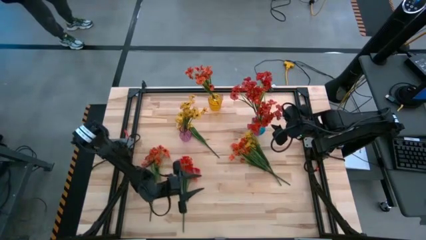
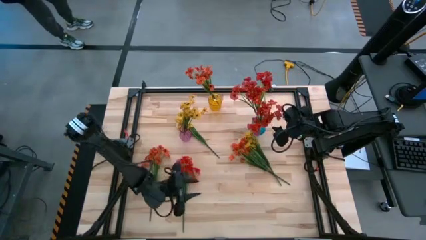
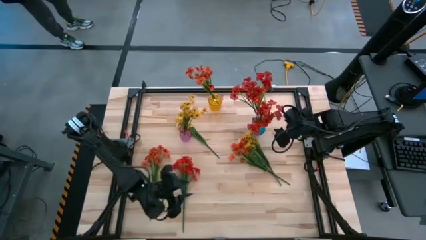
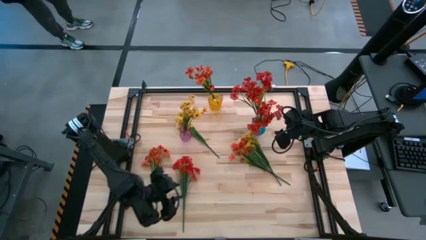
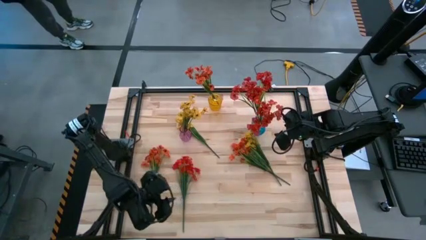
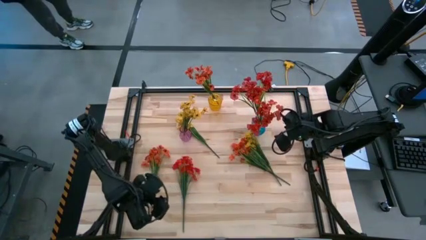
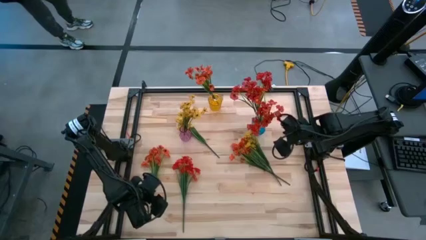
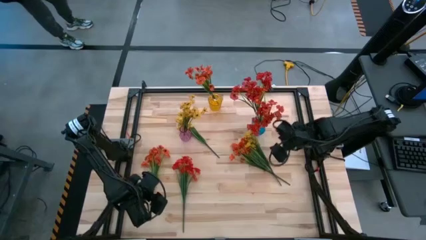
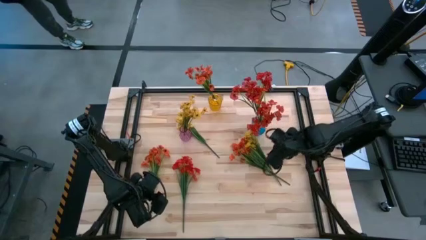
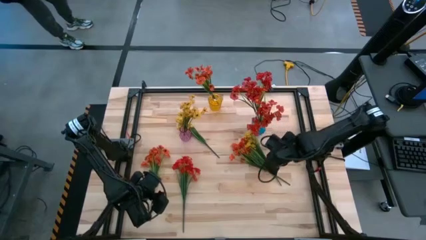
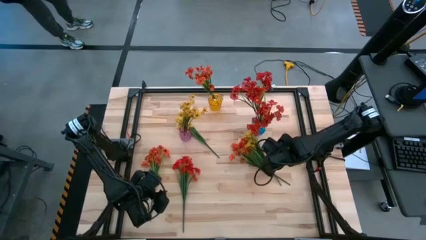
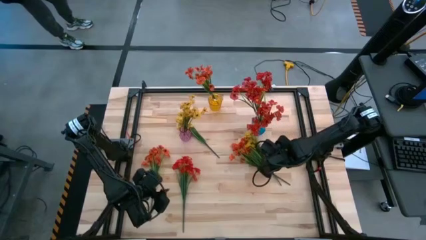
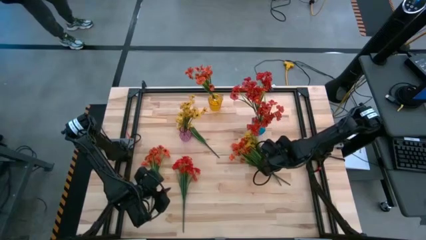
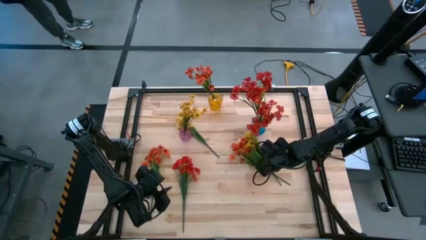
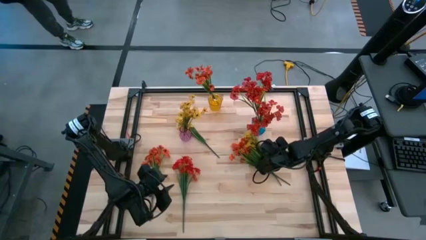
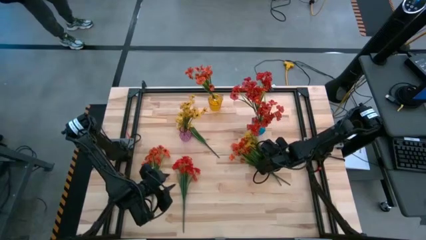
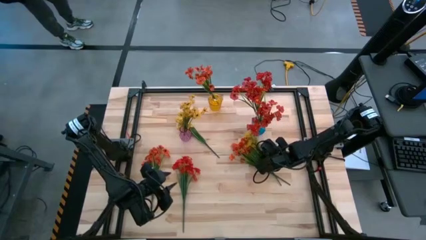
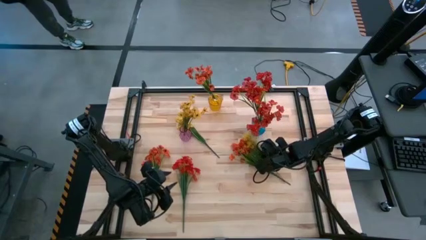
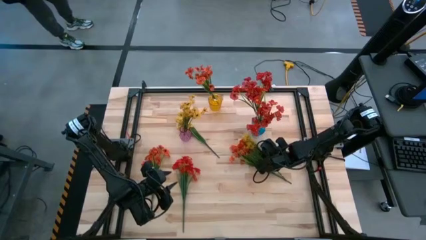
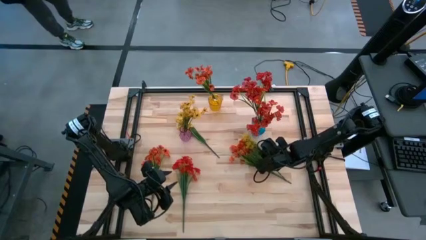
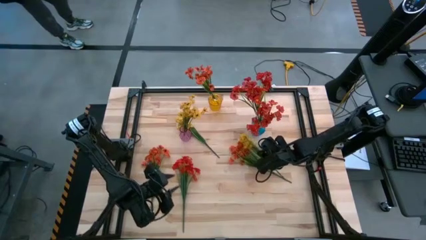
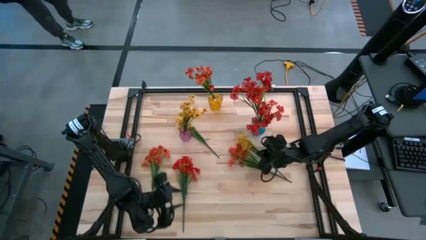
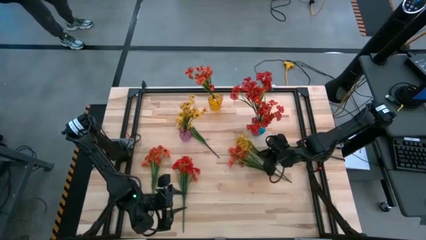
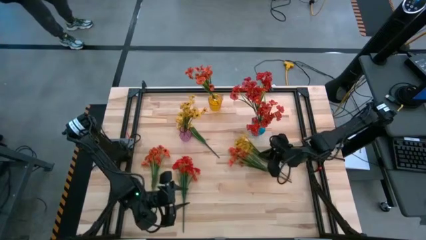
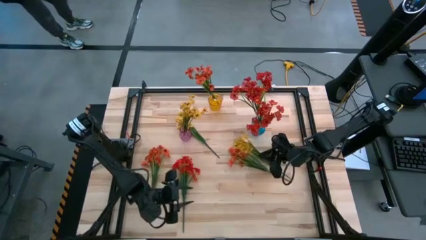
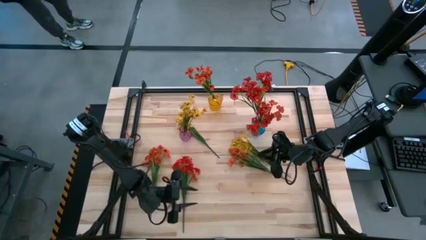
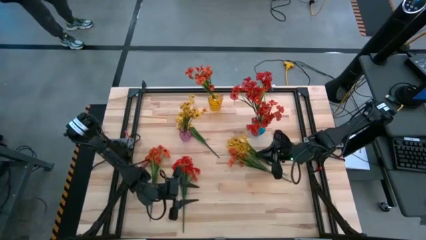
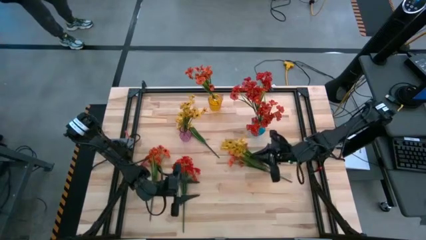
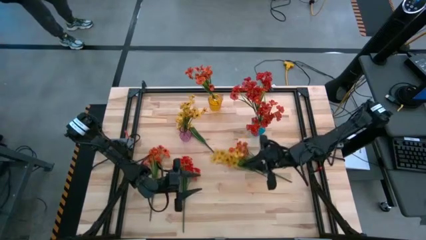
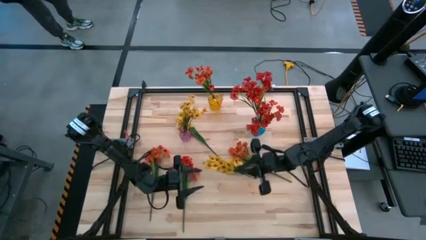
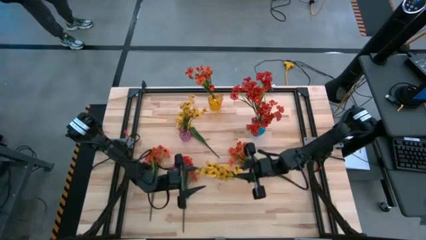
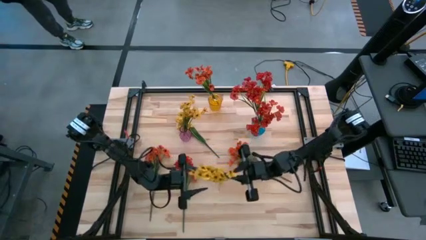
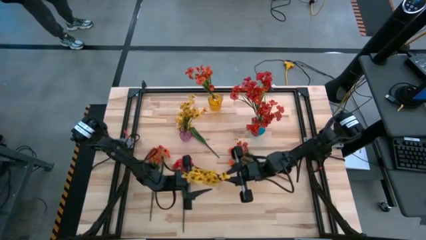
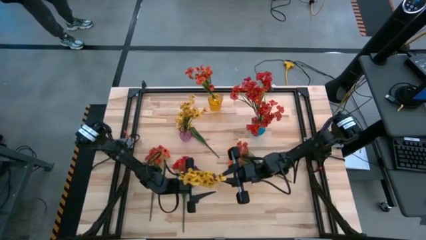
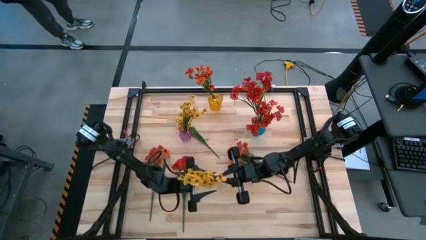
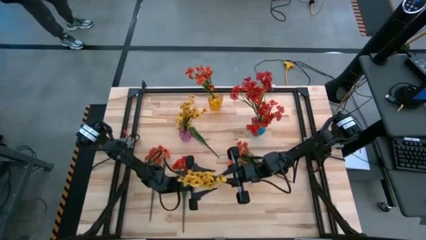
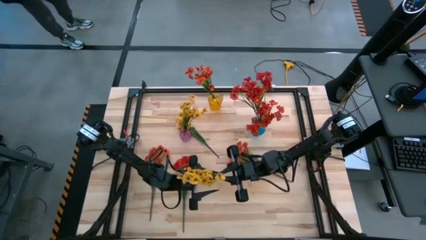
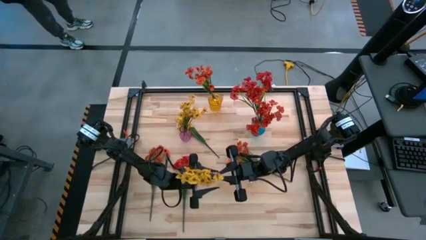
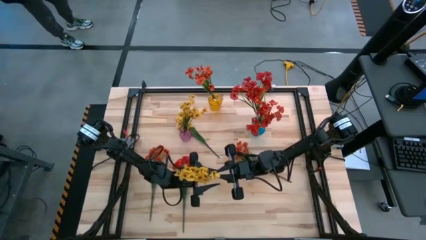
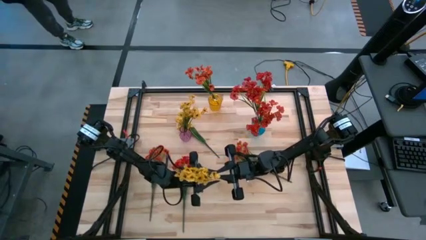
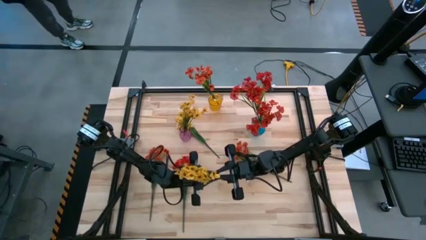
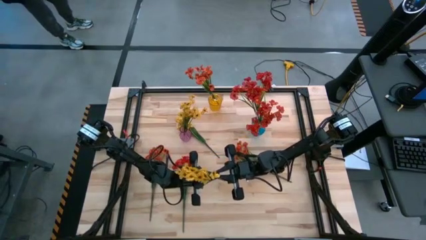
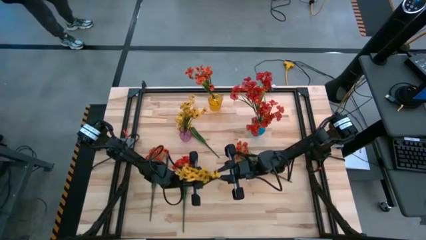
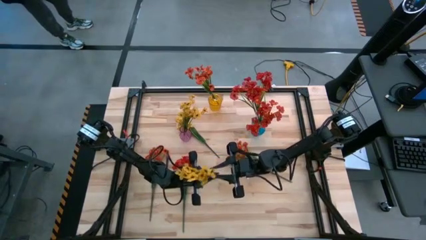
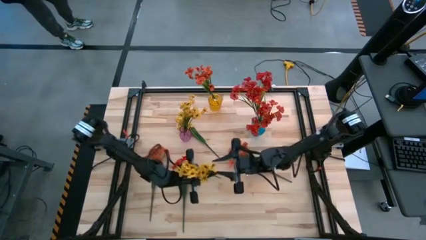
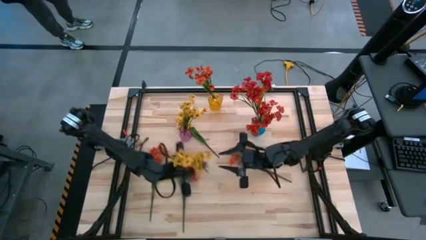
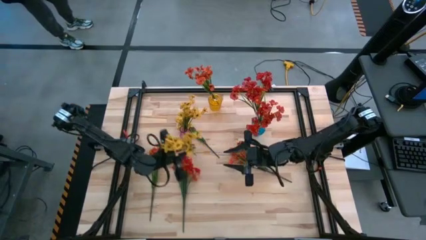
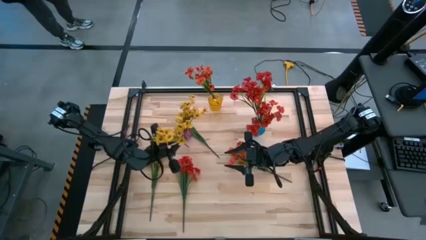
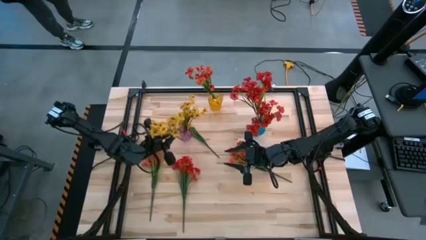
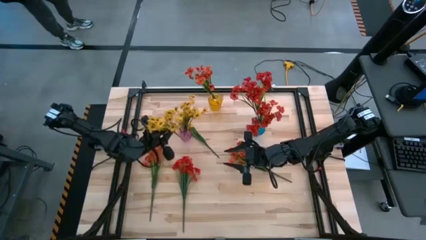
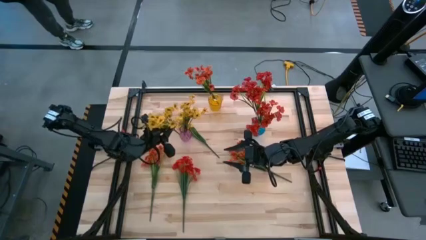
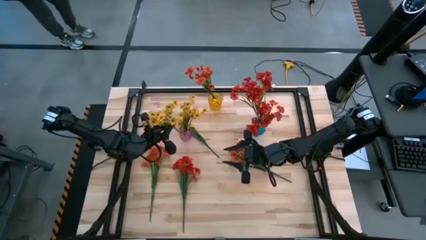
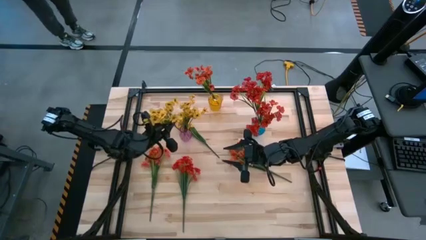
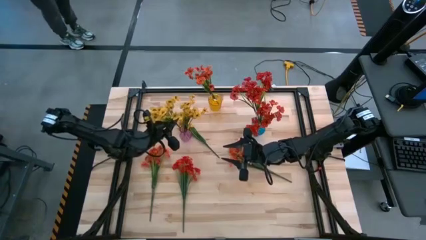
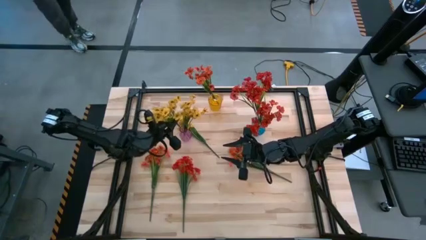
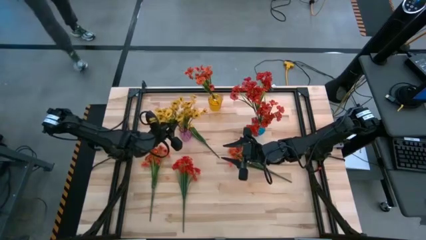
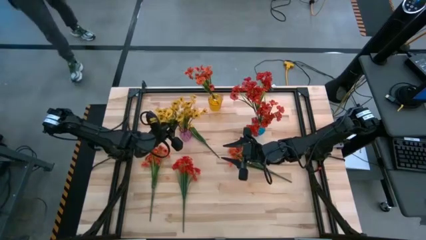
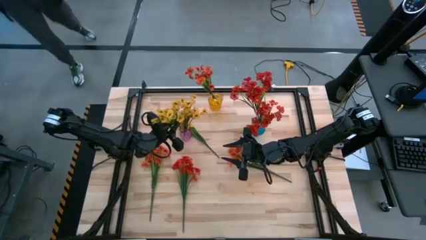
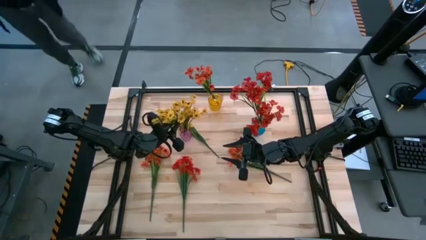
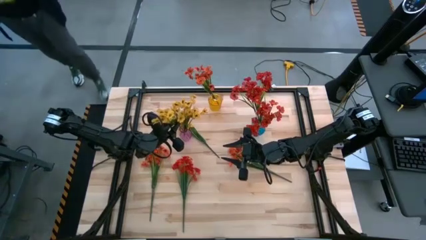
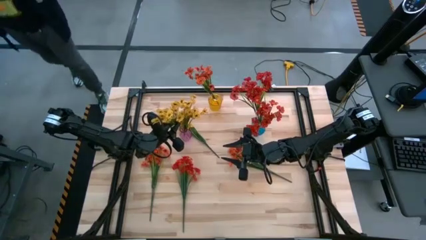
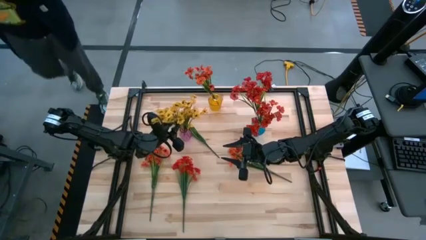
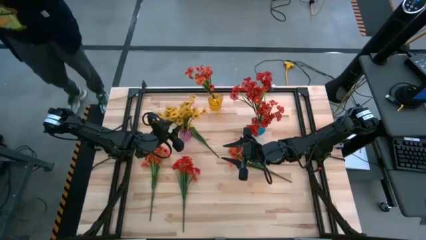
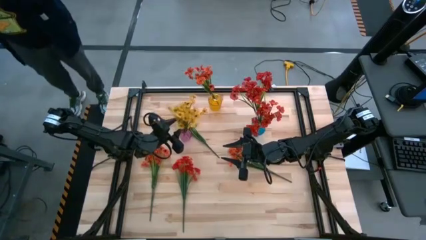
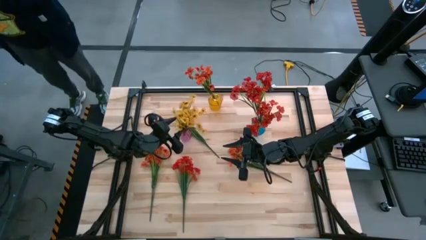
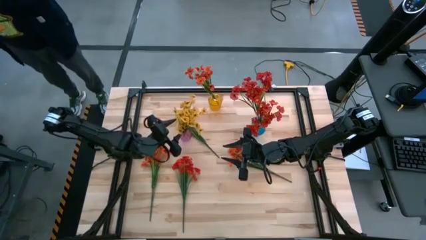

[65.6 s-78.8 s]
Task: Sort flowers into vase by color
Put the right yellow flower into the purple vase

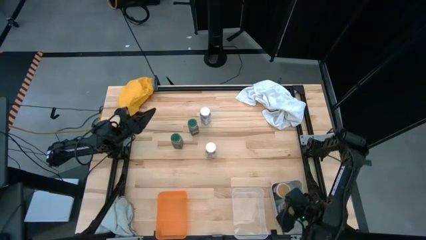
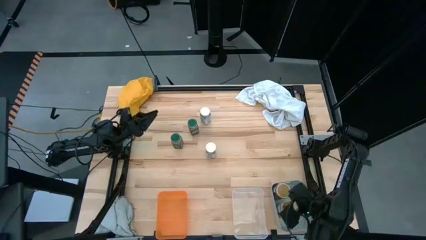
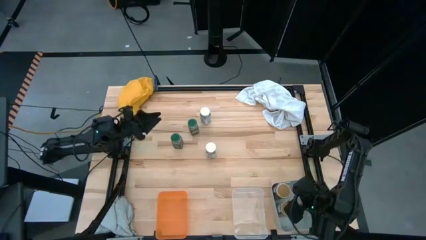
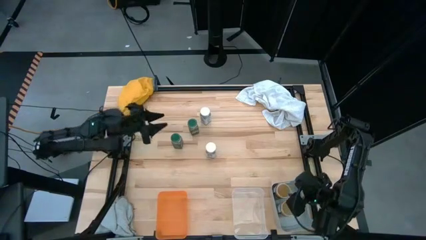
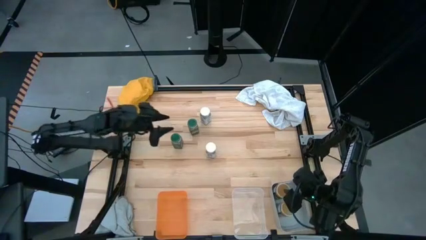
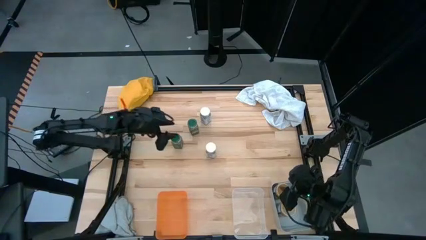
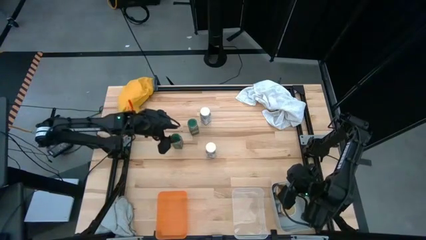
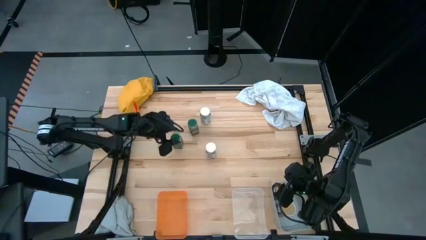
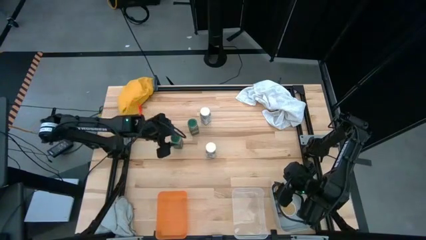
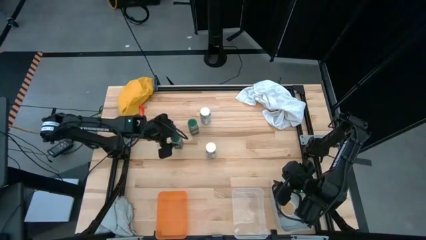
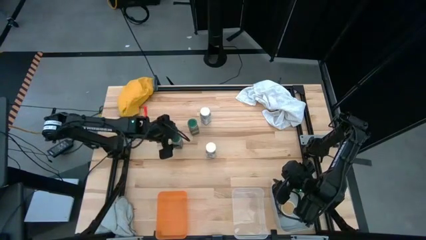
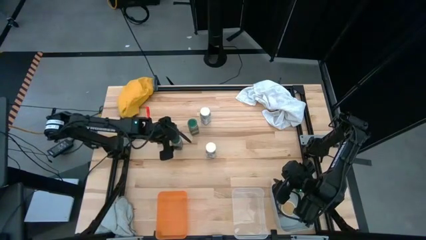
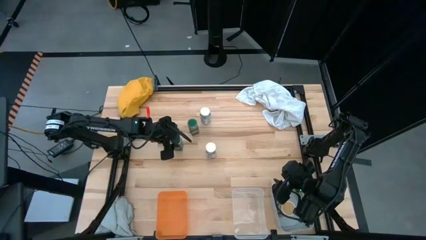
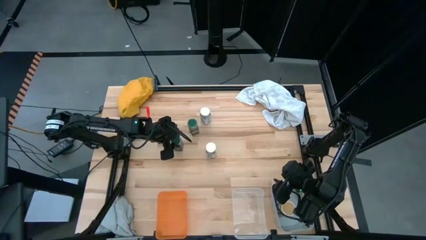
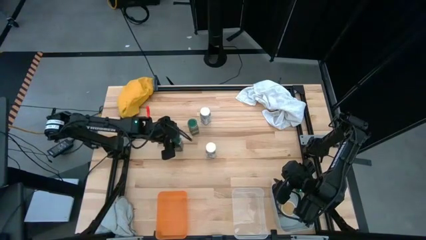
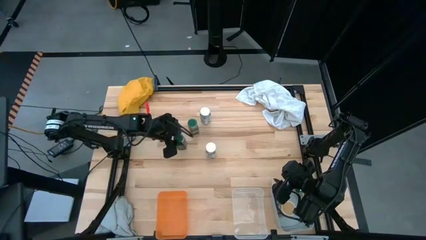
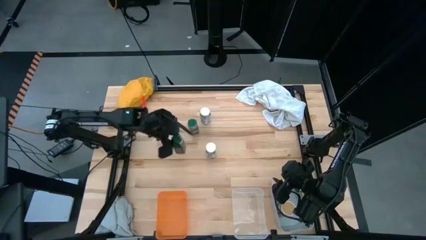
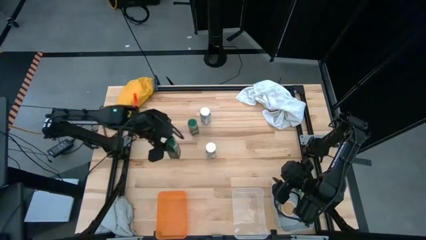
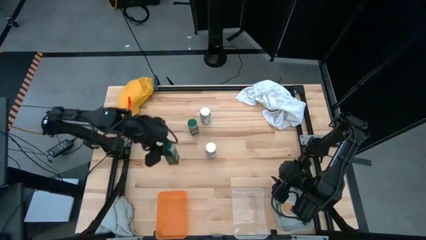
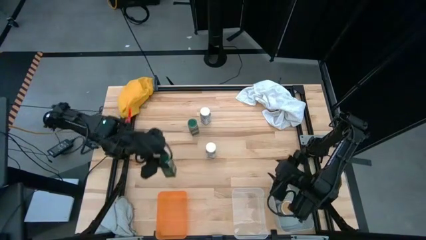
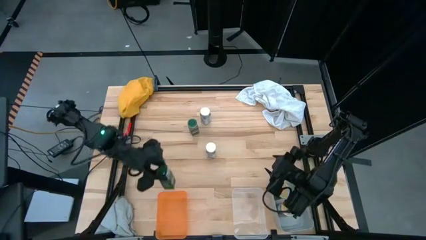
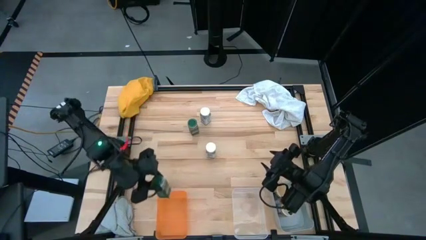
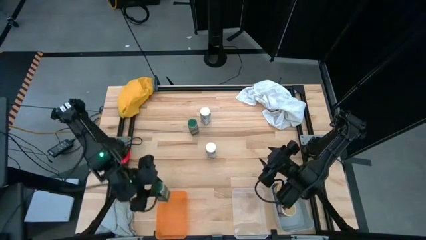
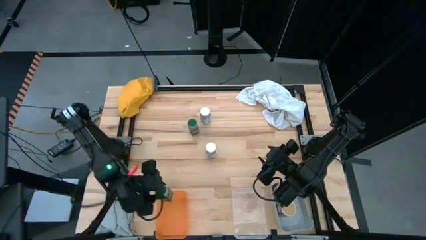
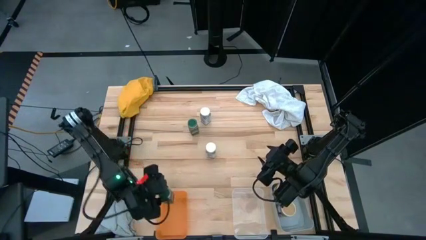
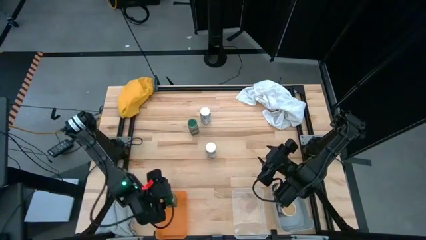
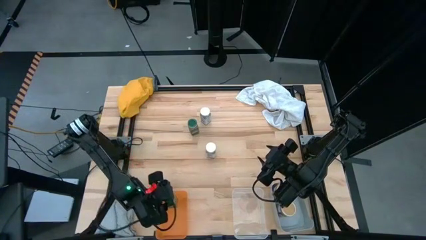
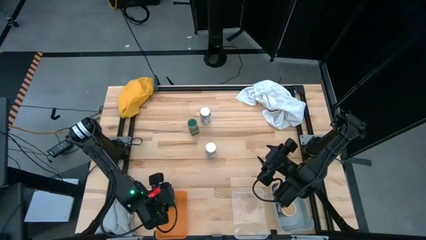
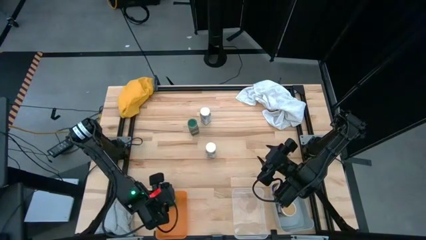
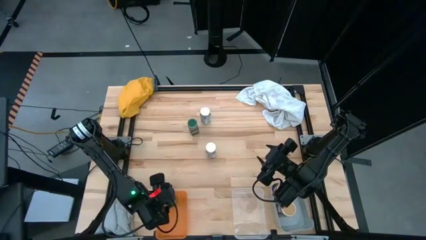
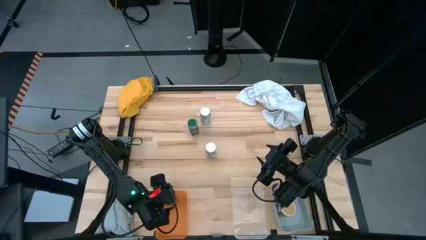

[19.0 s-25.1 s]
Task: Sort spices by type
Put the bottom green spice bottle into the orange bin
